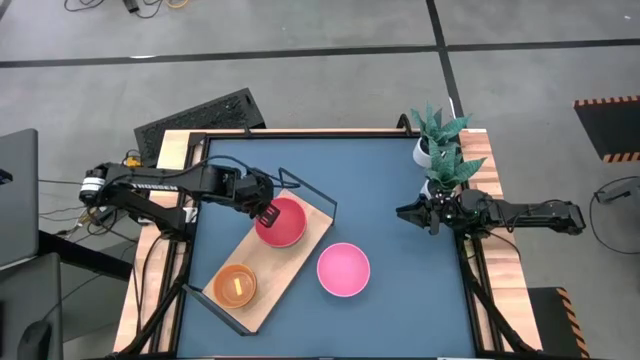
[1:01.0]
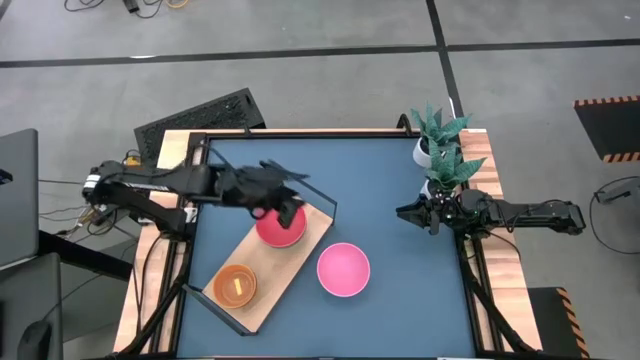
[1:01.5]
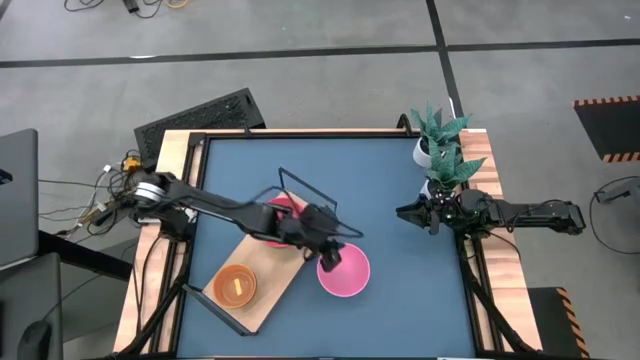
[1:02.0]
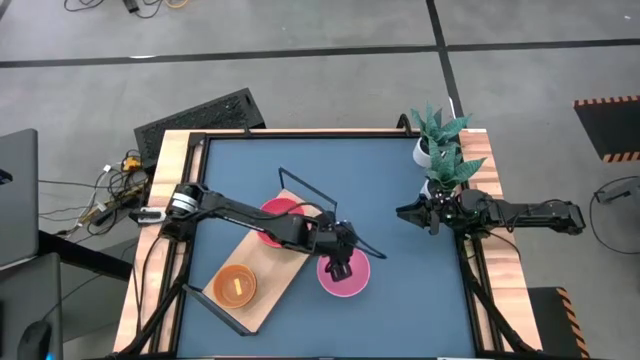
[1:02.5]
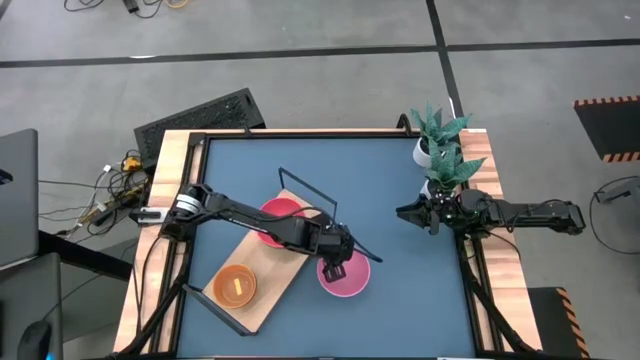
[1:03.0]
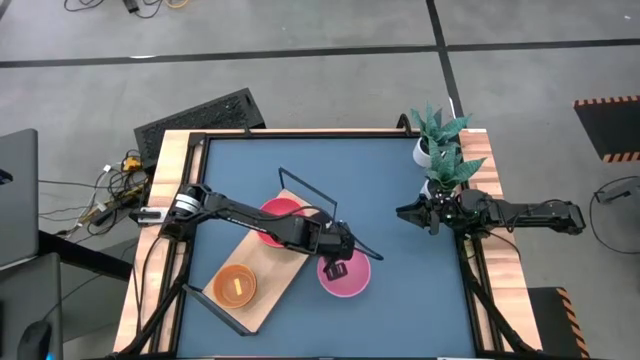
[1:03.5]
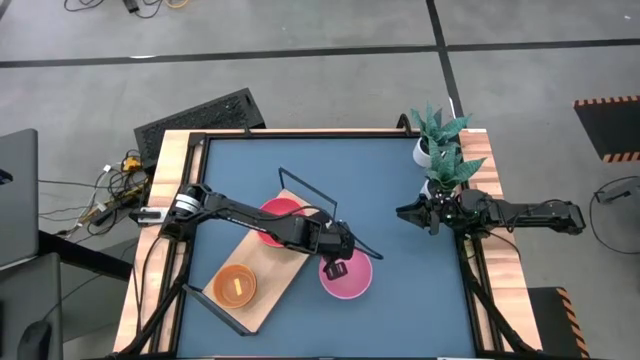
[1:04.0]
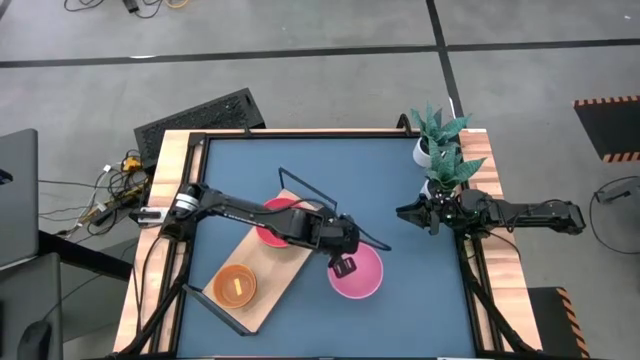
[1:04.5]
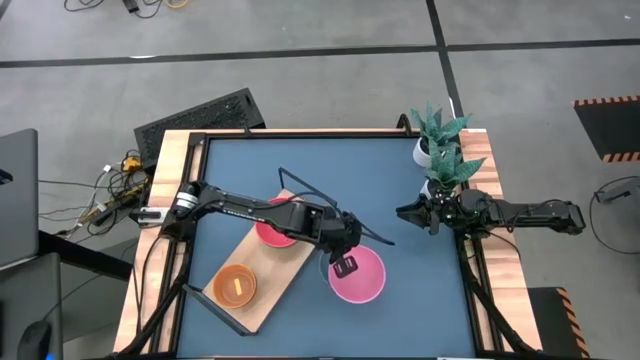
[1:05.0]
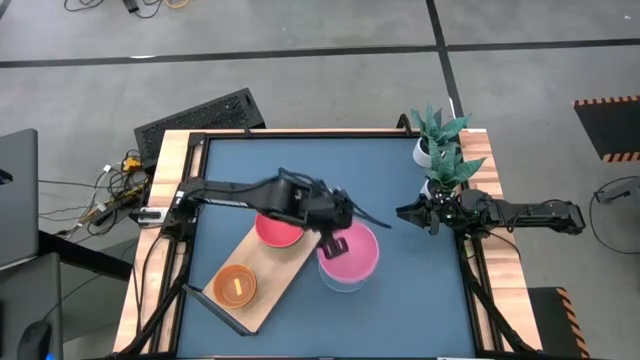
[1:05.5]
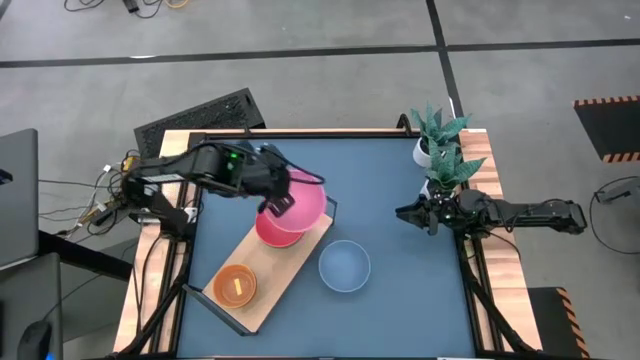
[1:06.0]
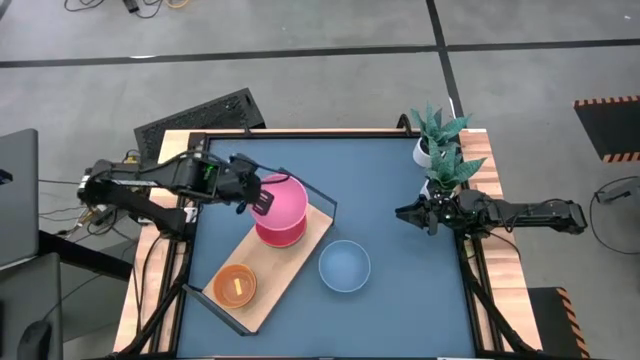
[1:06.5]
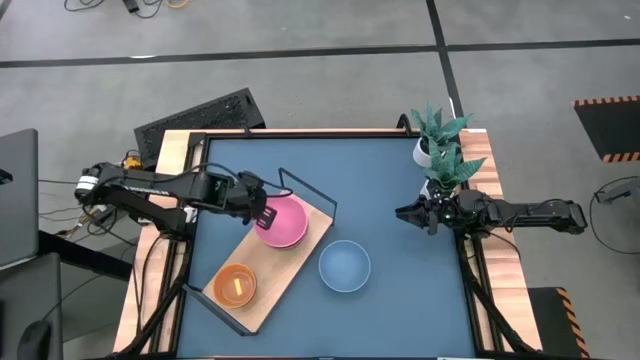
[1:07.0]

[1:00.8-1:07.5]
Task: Place and stack bowls onto a shelf
Stack the big pink bowl on top of the big red bowl on the shelf

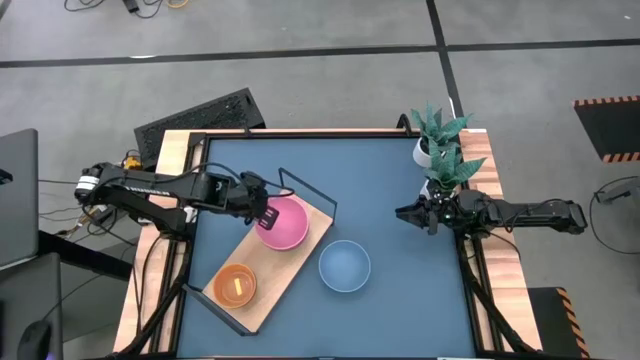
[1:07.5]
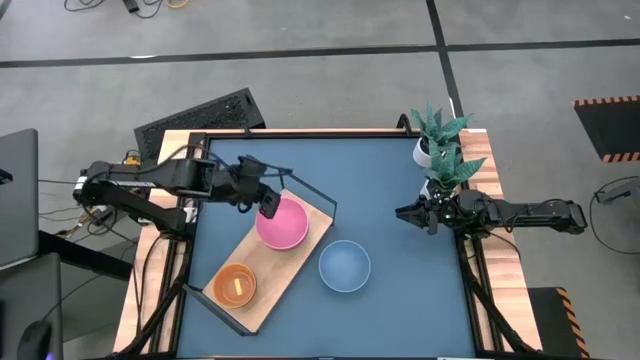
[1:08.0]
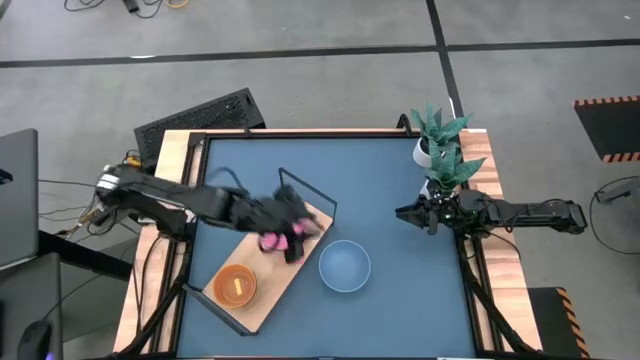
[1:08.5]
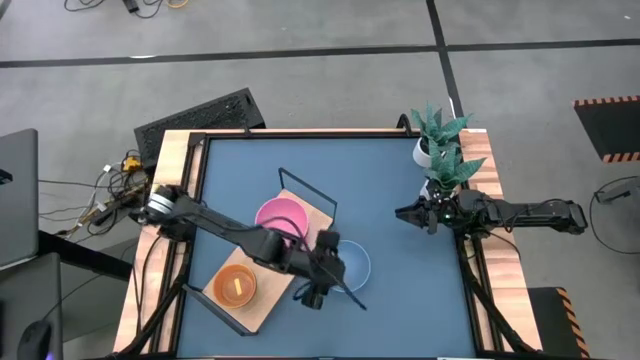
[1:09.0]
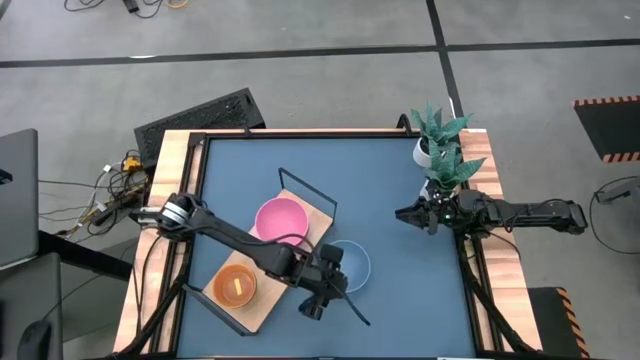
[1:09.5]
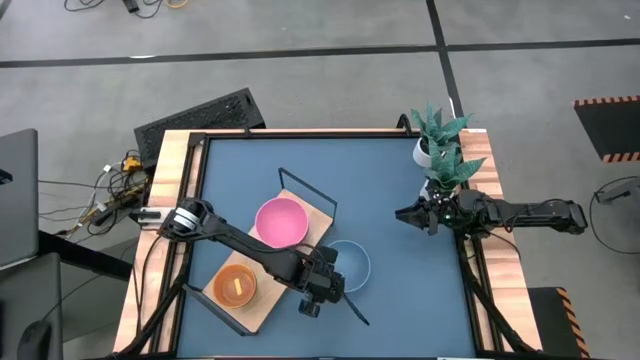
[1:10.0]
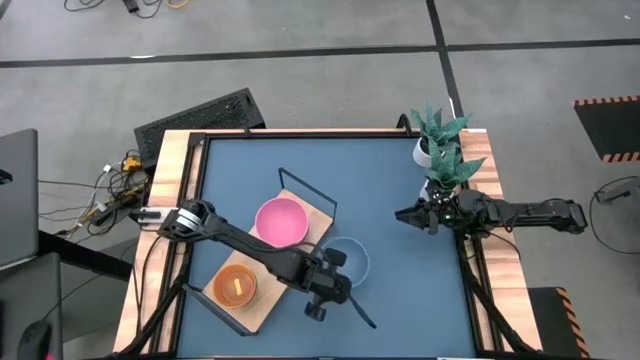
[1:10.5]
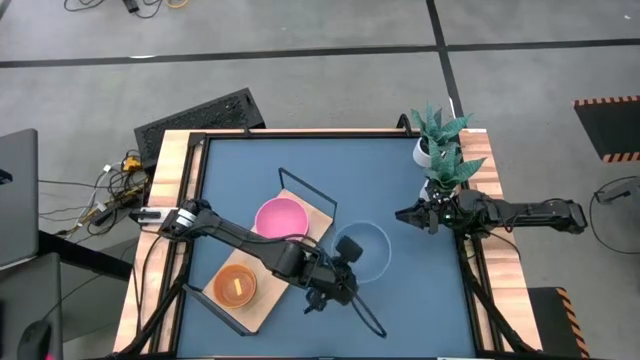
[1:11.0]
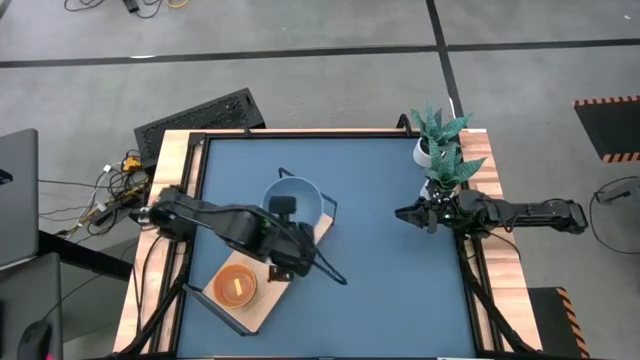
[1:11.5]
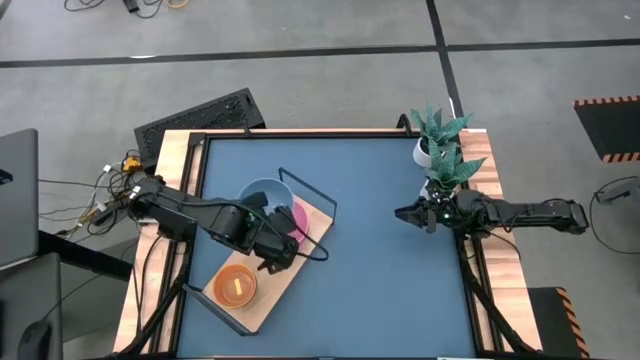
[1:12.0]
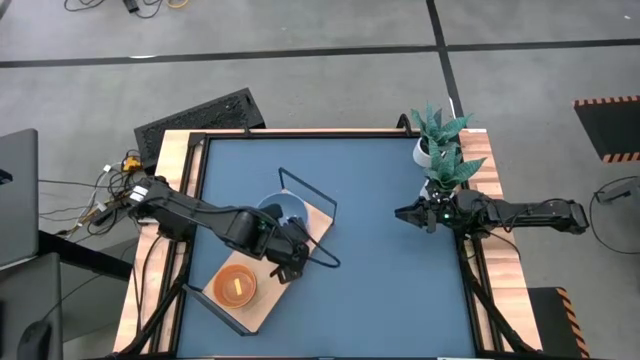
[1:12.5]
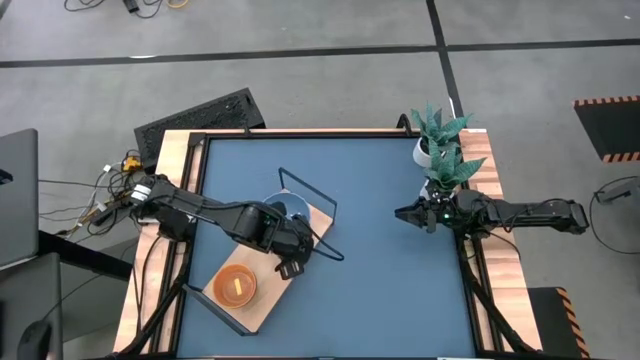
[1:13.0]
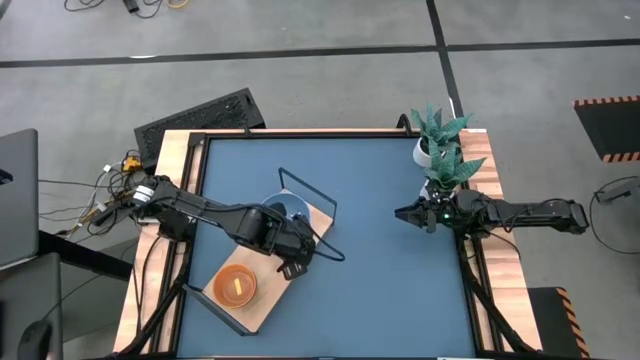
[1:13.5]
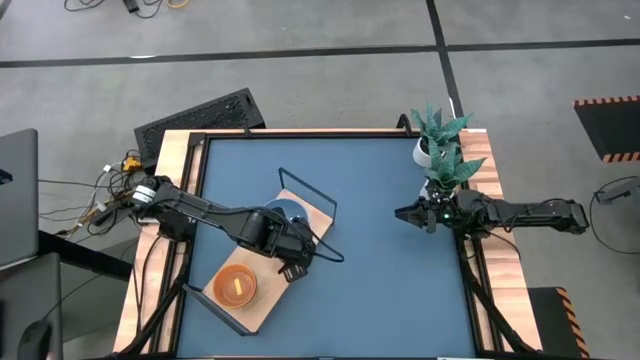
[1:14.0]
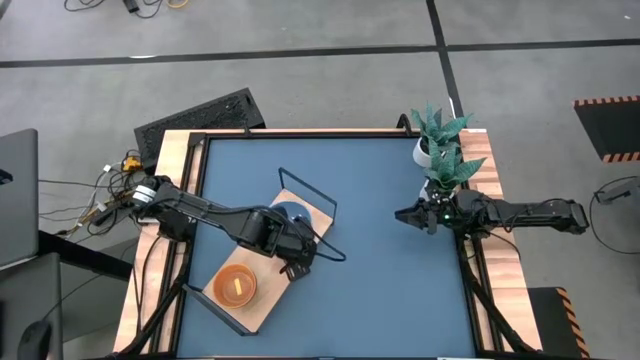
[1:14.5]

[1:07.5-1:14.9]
Stack the big blue bowl on top of the big pink bowl on the shelf

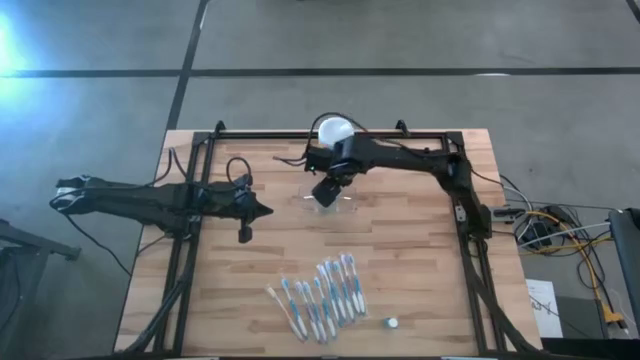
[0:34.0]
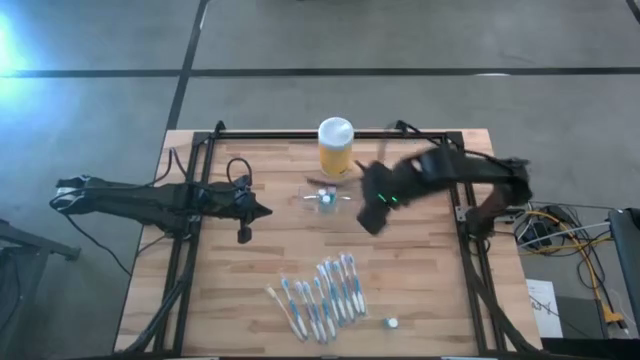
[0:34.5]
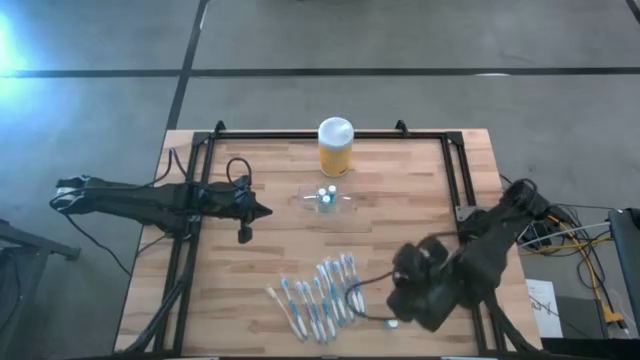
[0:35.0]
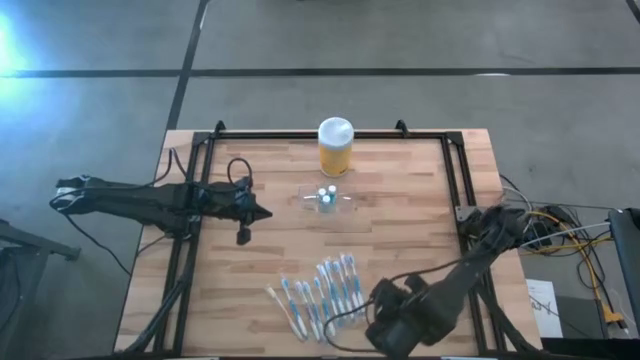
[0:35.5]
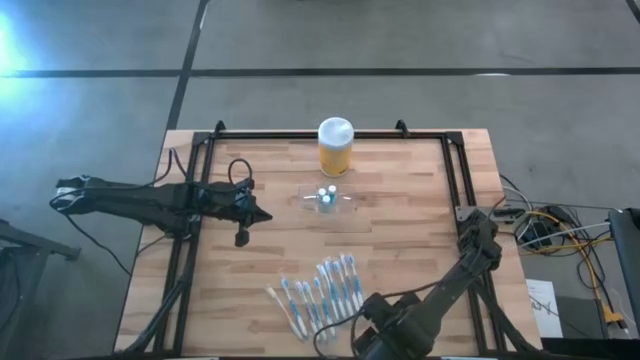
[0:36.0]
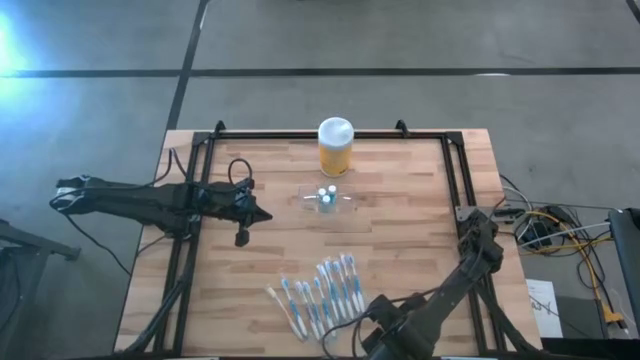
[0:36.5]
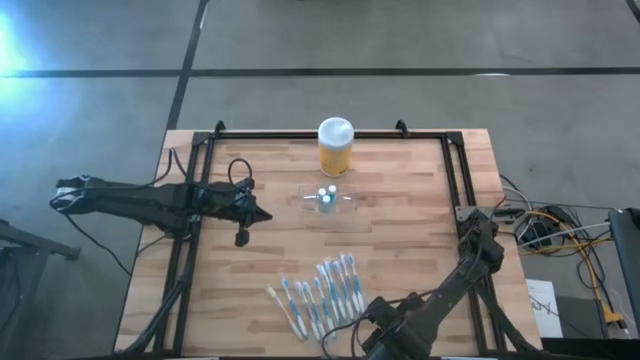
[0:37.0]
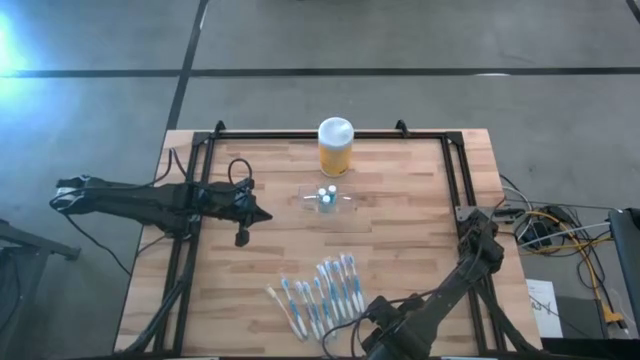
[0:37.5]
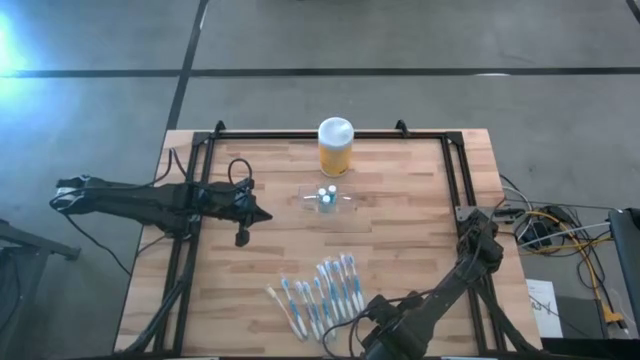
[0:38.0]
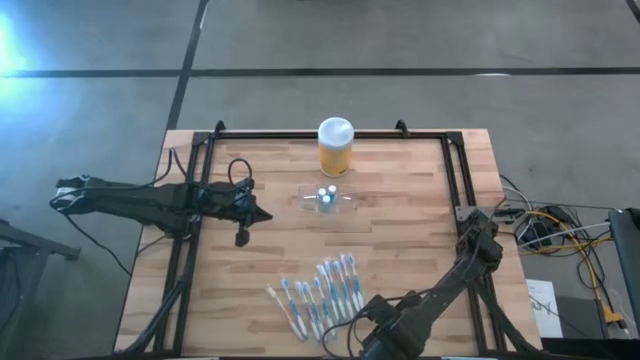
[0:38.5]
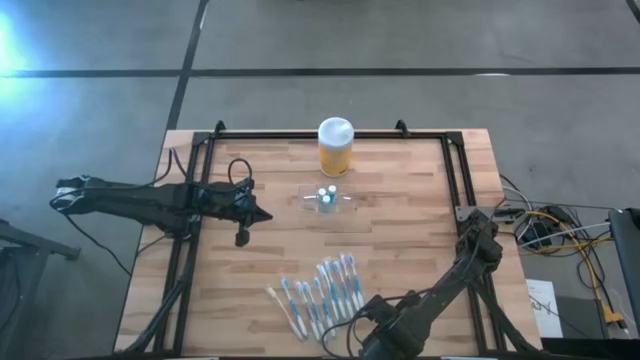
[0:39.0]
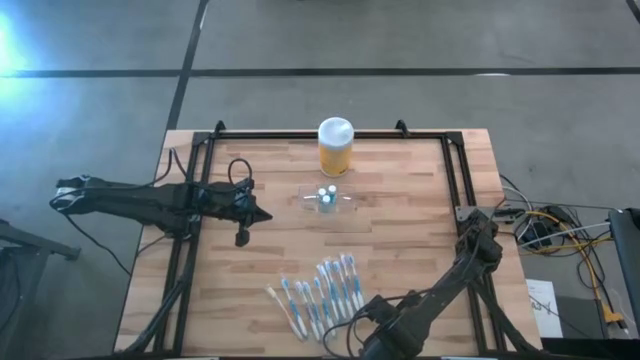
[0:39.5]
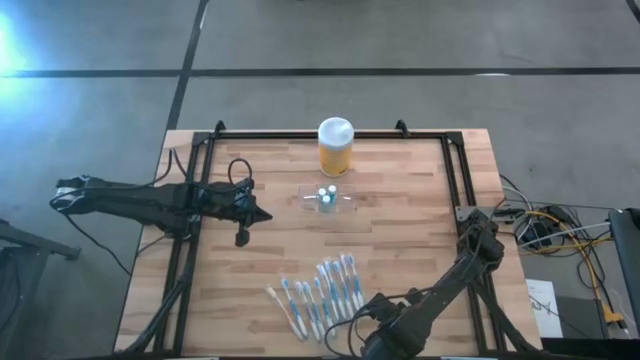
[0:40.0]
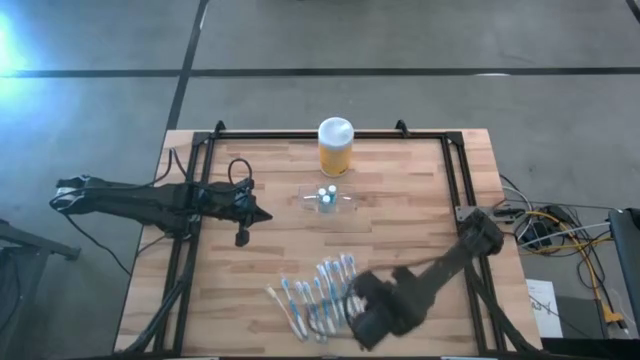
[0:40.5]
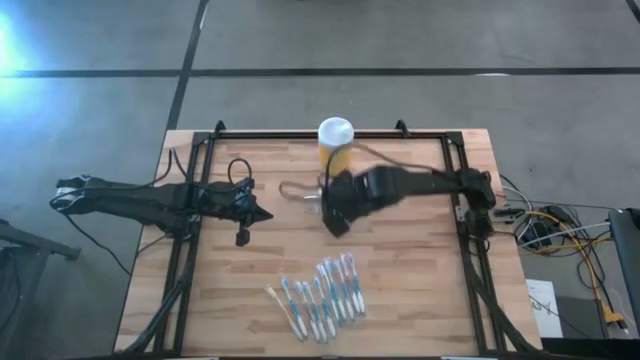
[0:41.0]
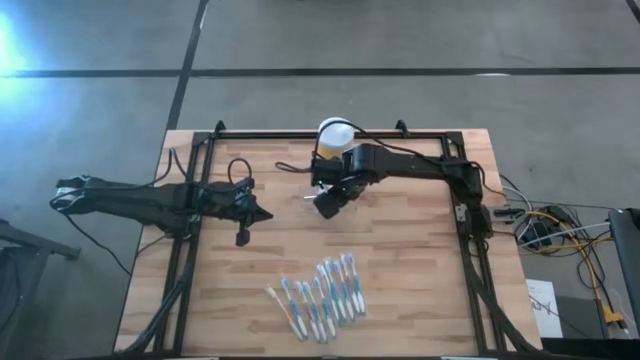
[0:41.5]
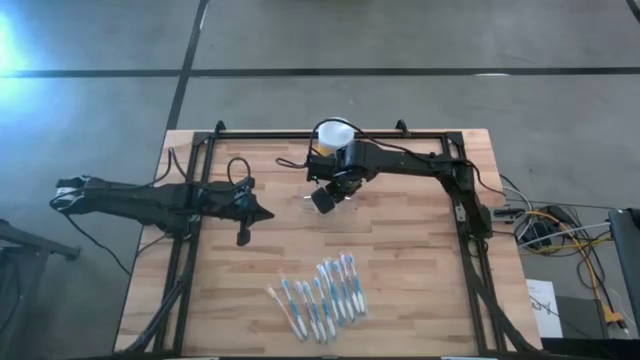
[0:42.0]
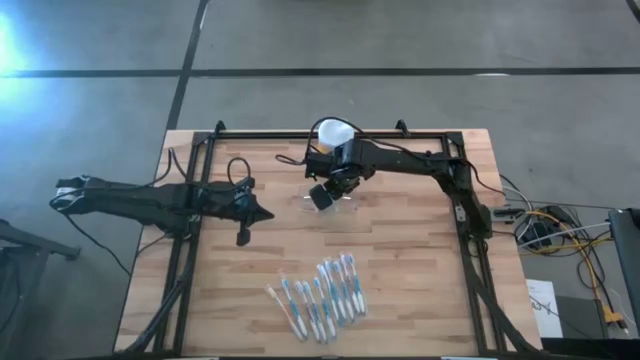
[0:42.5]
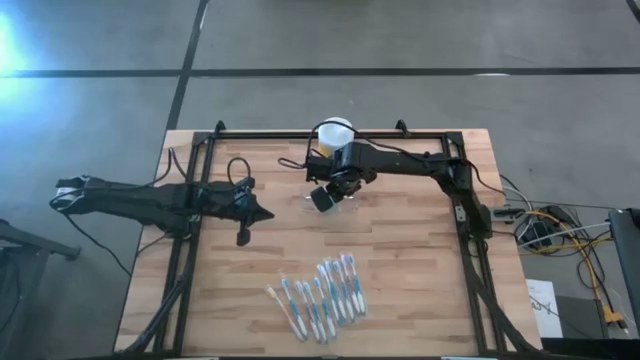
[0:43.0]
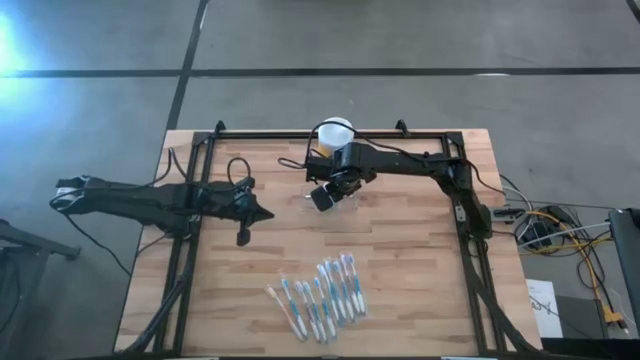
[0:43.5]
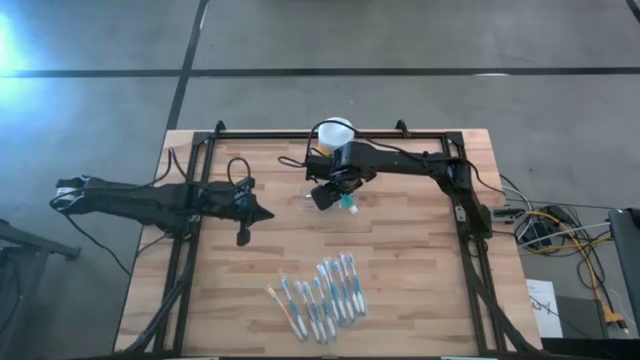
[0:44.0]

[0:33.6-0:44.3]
Task: Pick & Place toothbrushing station
Put the blue mouthwash bottle into the transparent organizer
